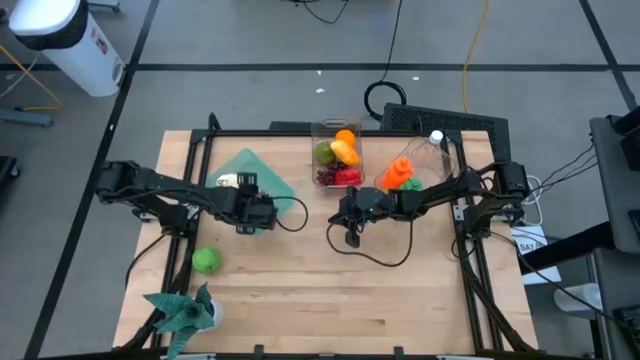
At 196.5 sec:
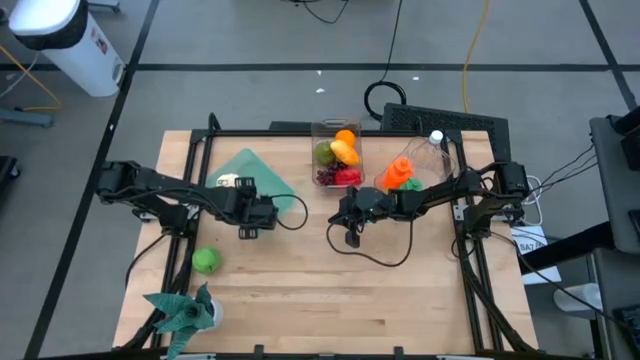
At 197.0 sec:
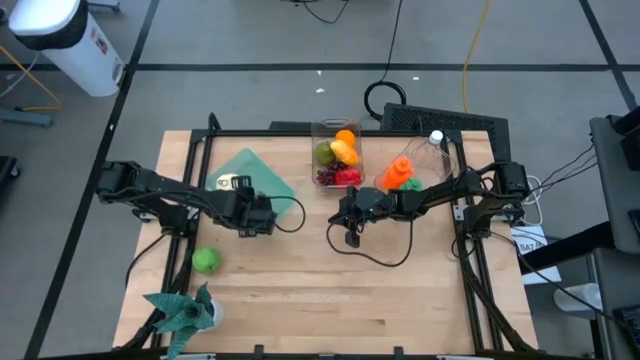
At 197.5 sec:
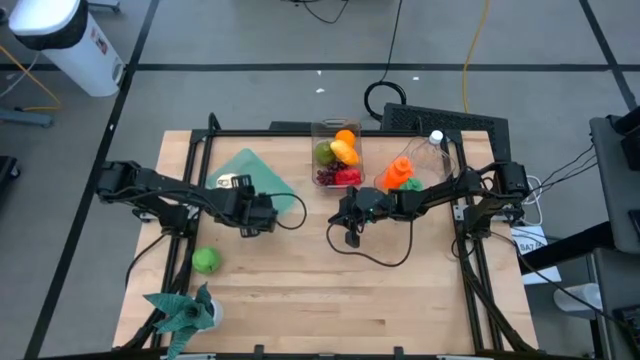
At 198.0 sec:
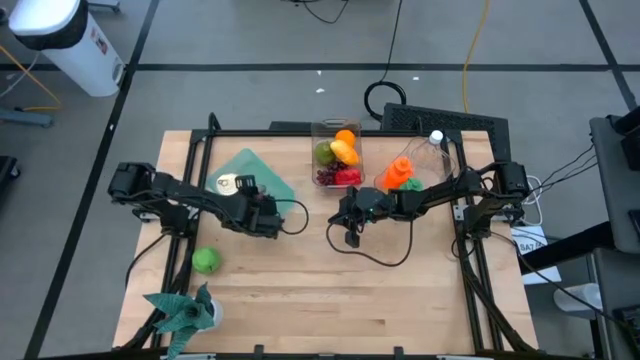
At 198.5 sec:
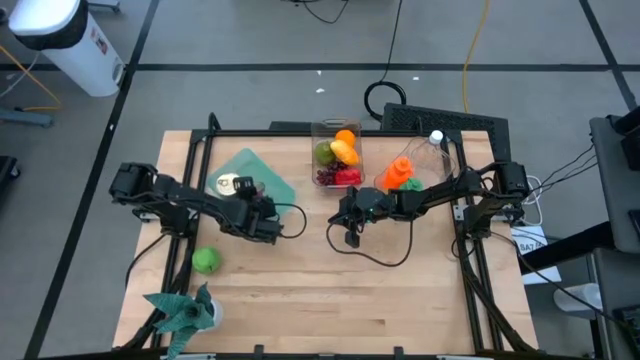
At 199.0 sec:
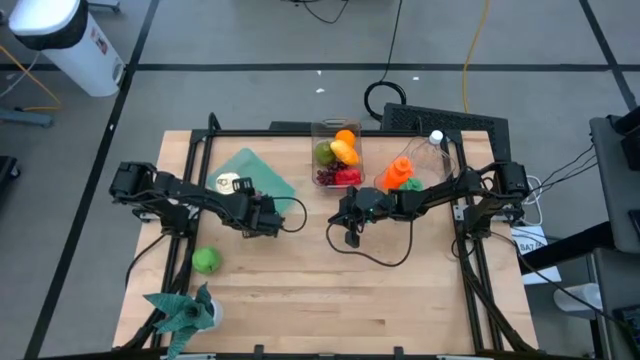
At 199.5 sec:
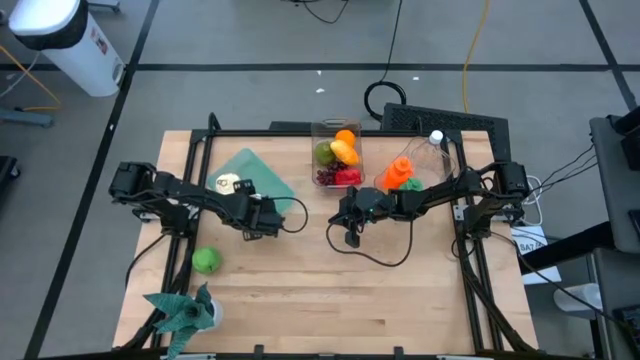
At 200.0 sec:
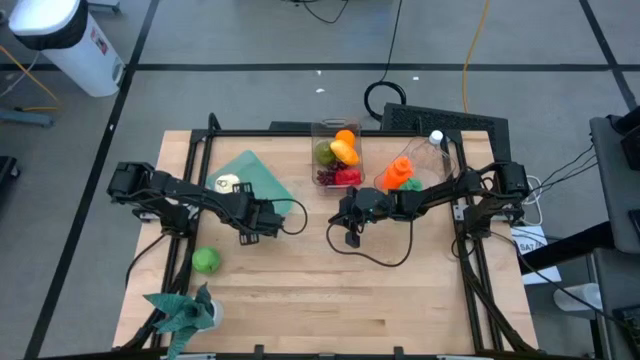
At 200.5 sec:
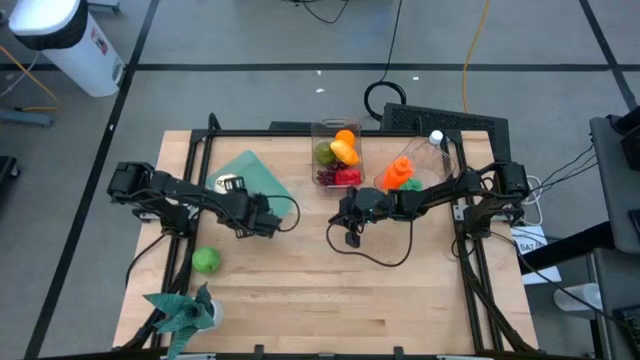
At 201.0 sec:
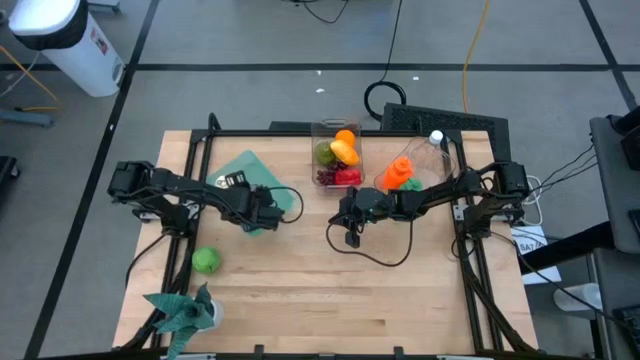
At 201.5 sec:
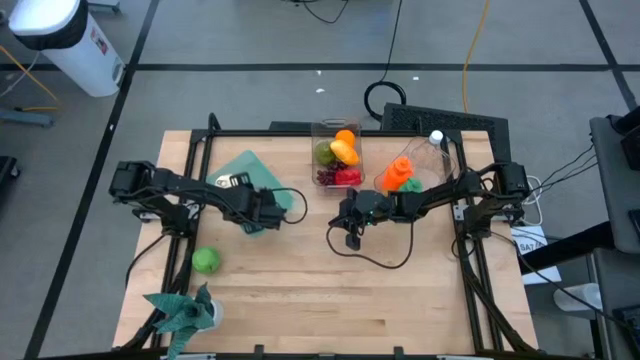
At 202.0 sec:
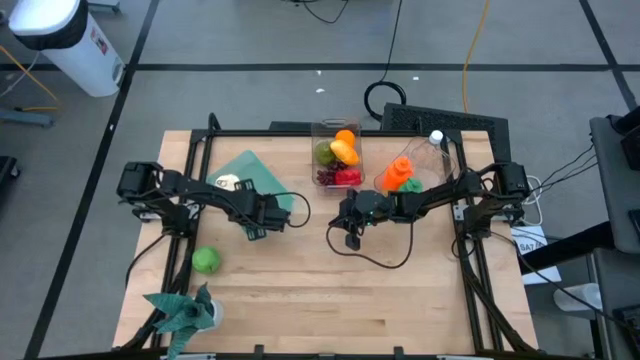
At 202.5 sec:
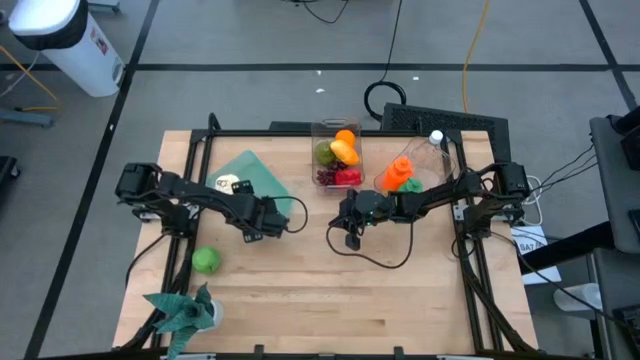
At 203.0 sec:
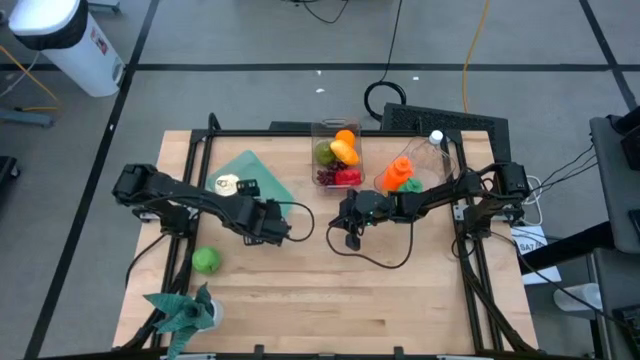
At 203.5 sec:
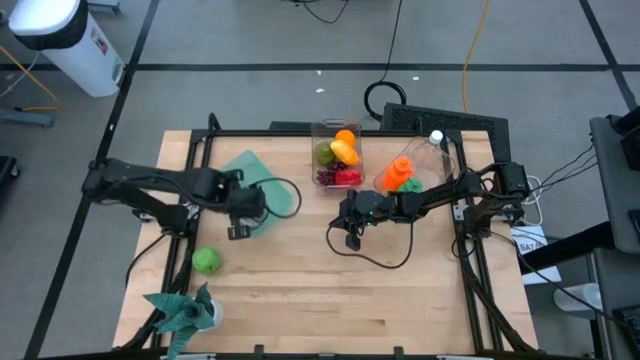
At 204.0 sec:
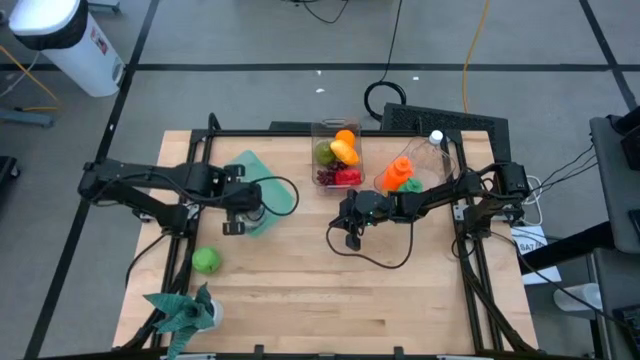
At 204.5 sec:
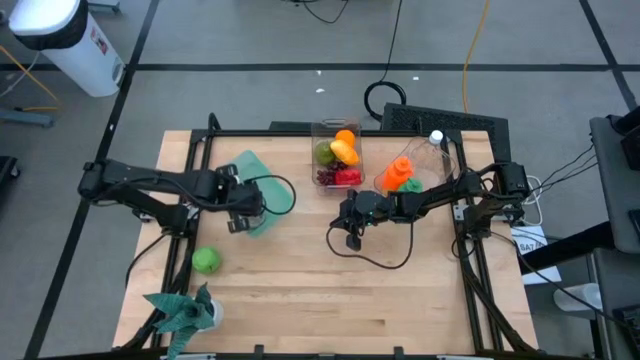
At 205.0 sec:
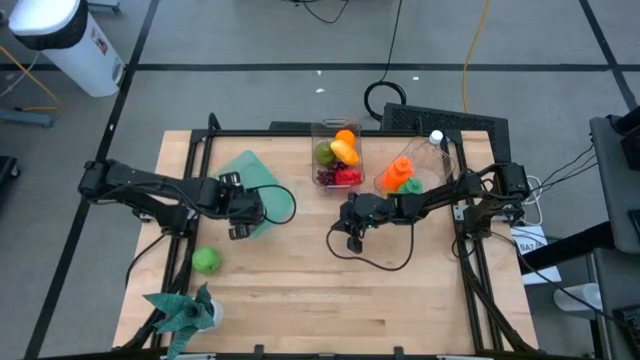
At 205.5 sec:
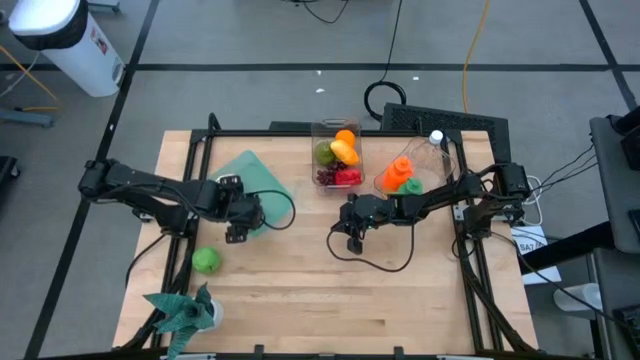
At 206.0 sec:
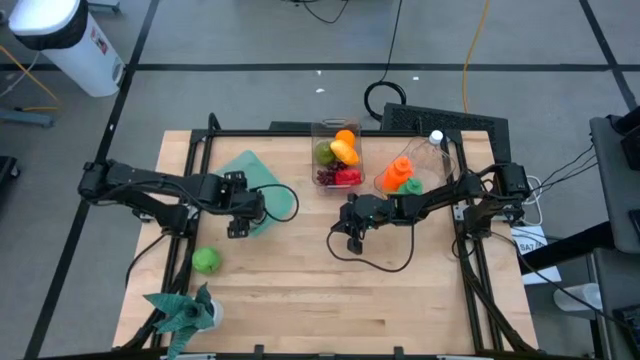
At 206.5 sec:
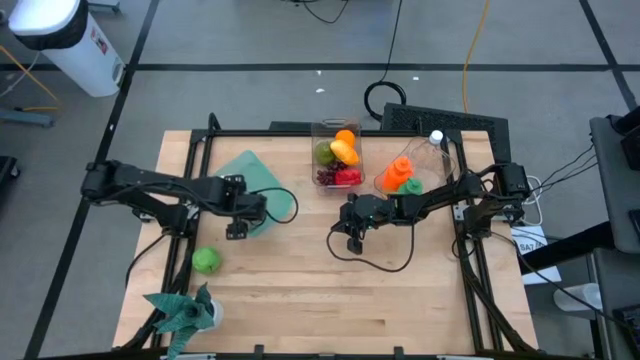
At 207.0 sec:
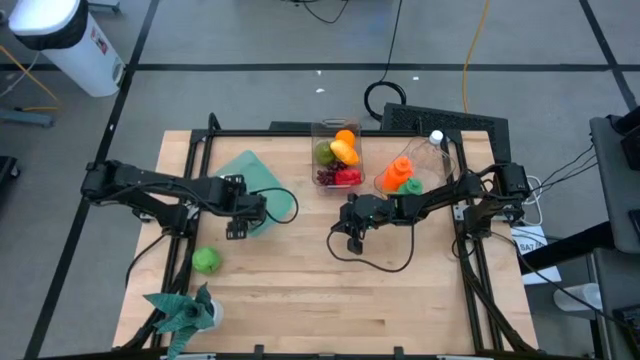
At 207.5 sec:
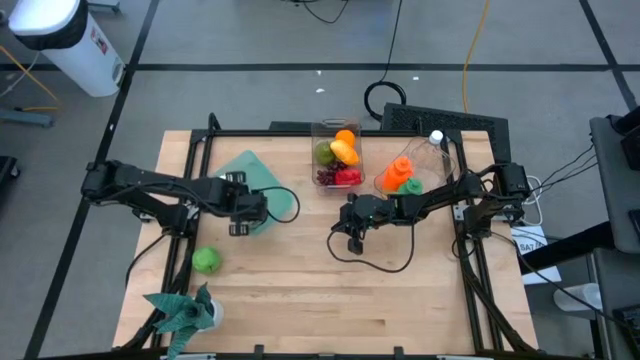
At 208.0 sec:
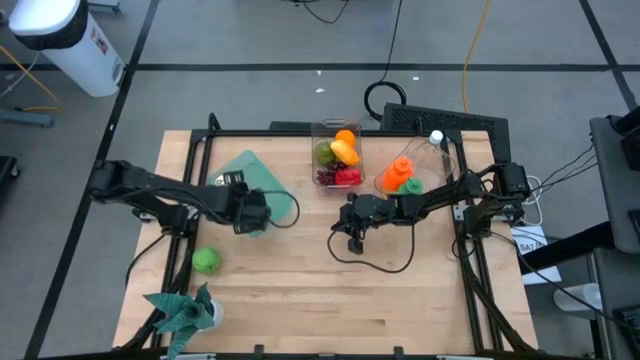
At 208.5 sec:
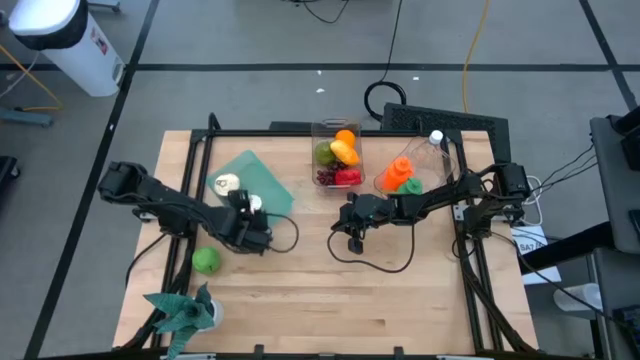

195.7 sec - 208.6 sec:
Task: Pick & Place Food Item
Put the blue pink tuna can into the green bin

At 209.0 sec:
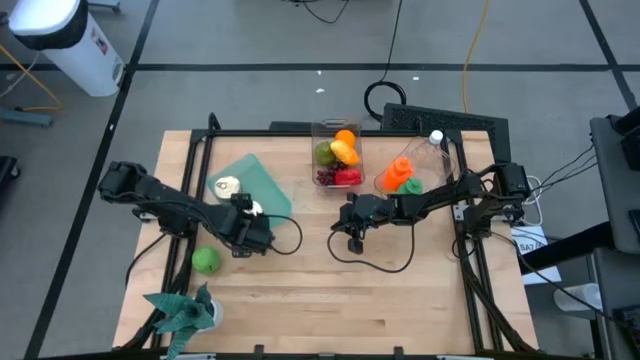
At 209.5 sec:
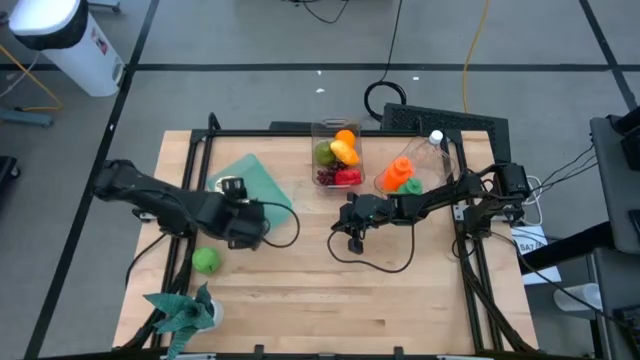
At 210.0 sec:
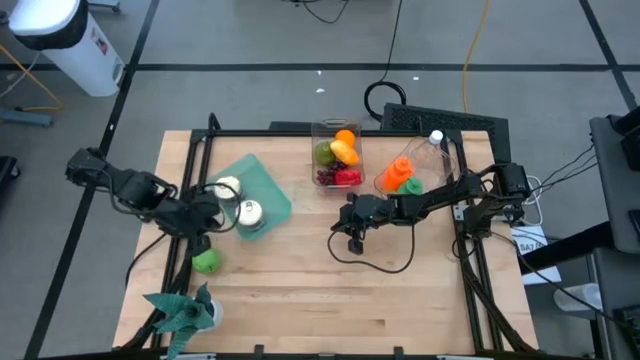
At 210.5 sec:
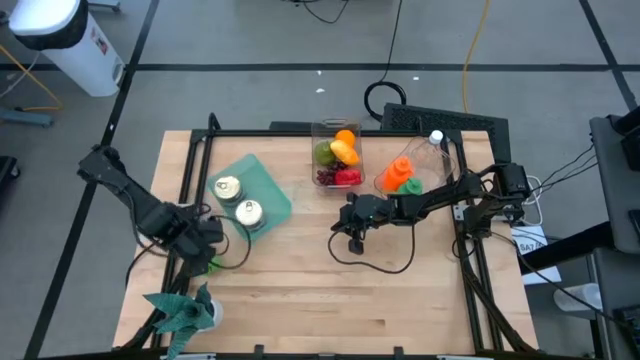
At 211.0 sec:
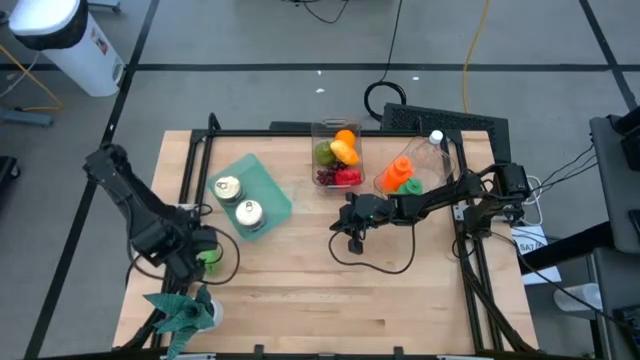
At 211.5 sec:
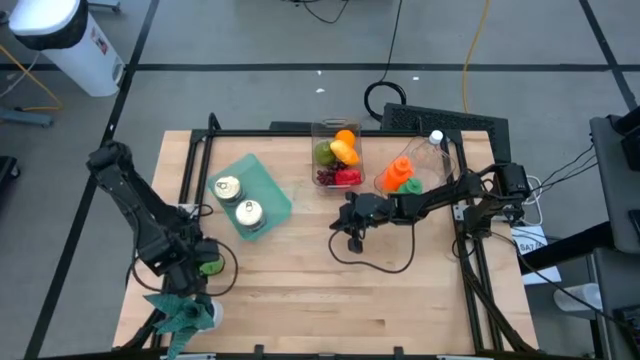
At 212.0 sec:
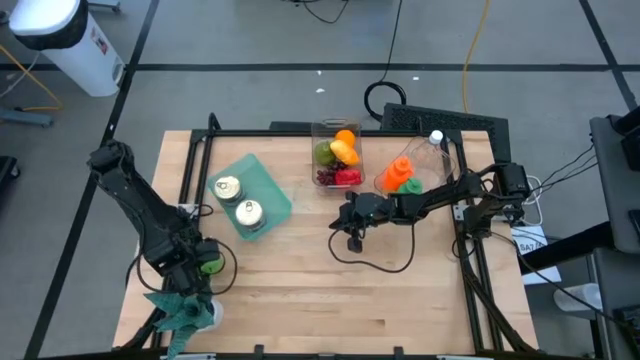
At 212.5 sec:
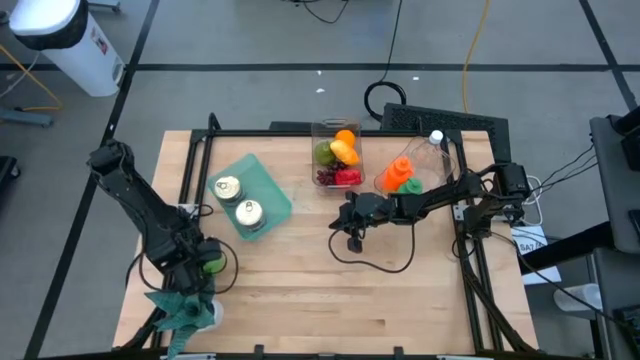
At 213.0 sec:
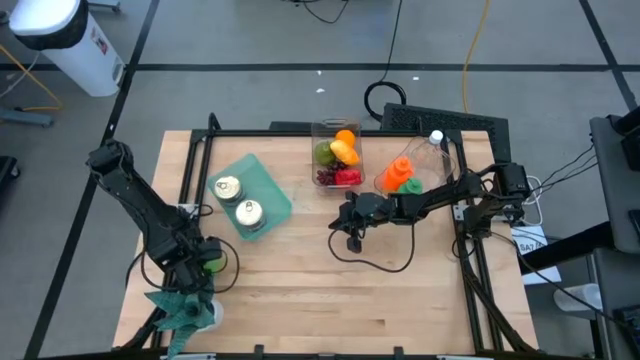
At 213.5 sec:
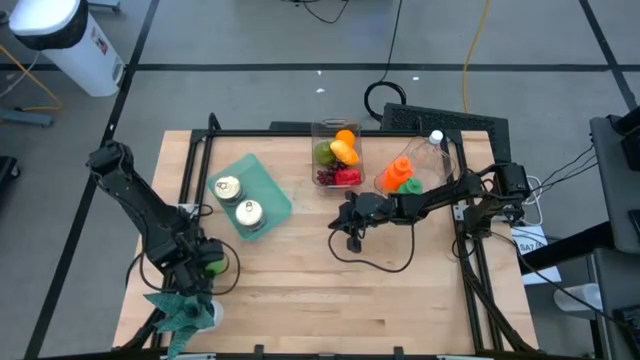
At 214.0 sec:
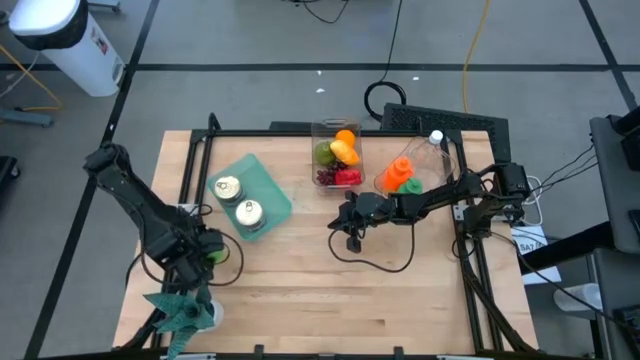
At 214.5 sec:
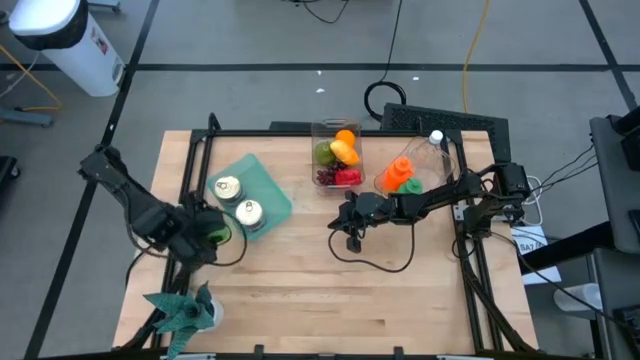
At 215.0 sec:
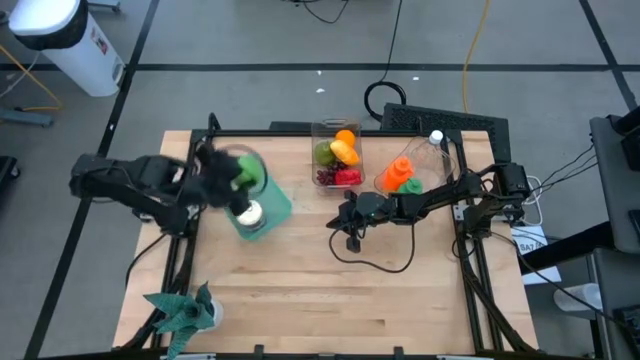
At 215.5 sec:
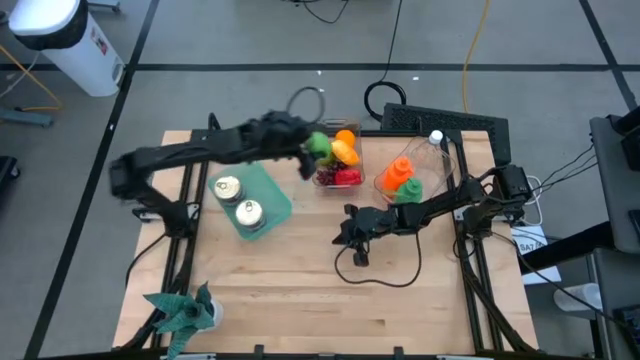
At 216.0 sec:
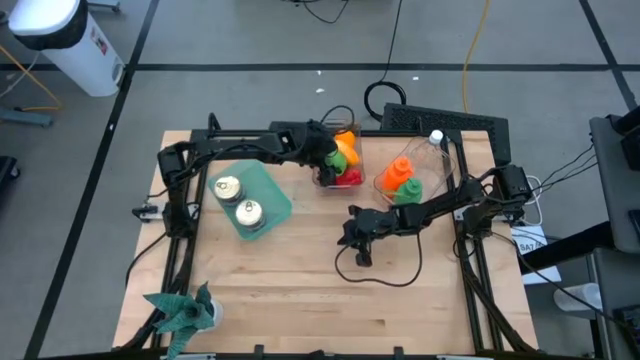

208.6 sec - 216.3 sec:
Put the green apple into left transparent bin
